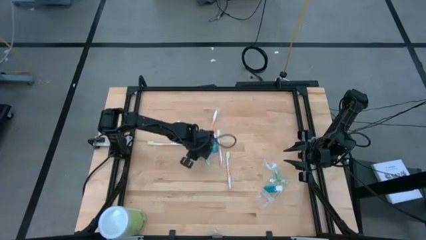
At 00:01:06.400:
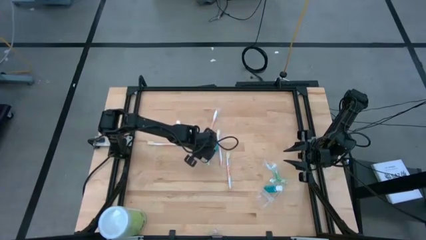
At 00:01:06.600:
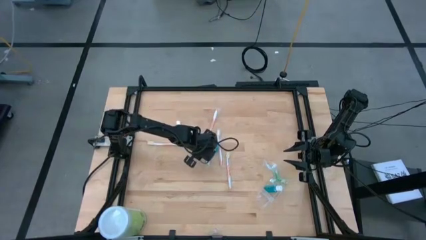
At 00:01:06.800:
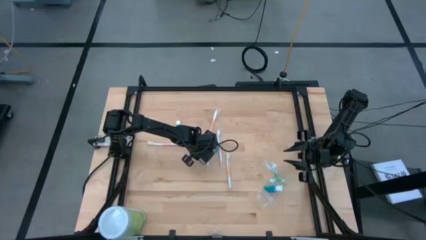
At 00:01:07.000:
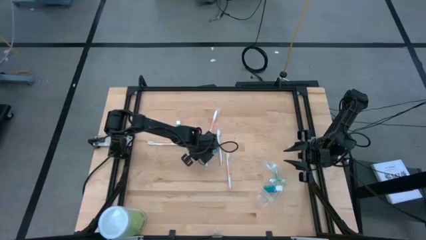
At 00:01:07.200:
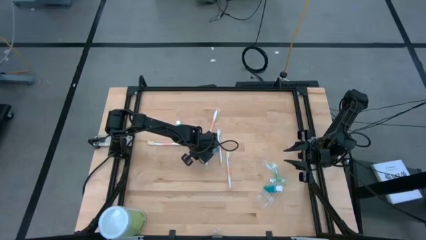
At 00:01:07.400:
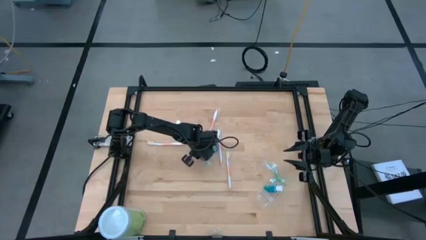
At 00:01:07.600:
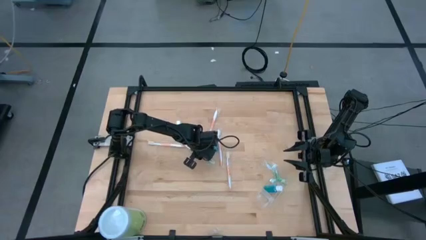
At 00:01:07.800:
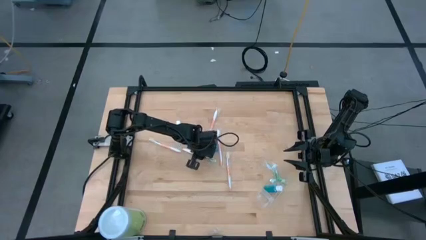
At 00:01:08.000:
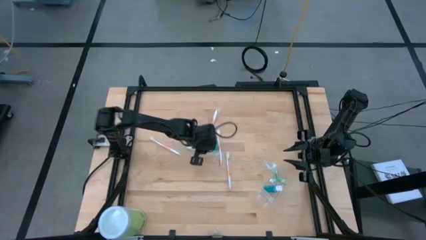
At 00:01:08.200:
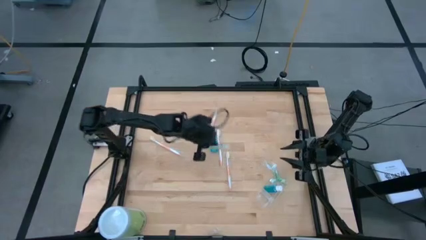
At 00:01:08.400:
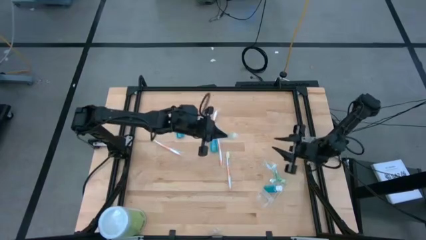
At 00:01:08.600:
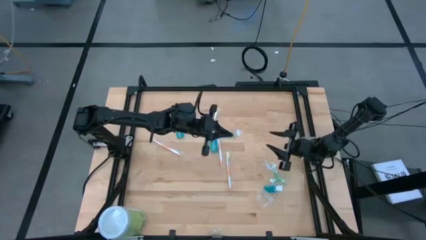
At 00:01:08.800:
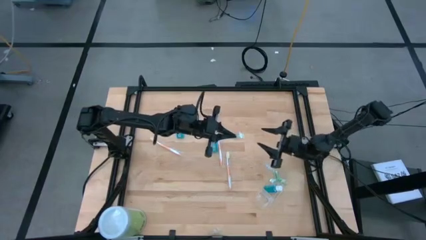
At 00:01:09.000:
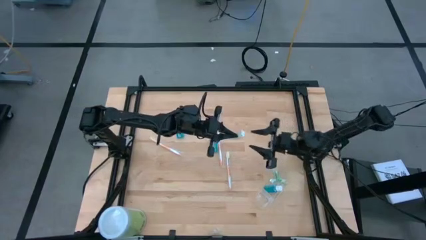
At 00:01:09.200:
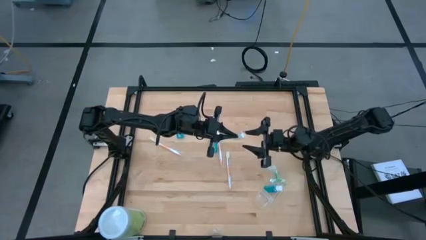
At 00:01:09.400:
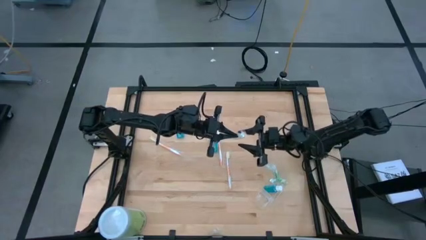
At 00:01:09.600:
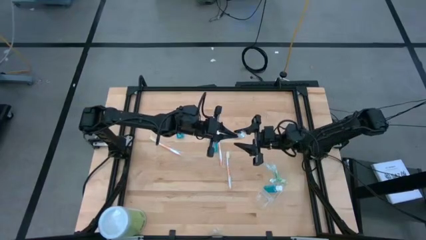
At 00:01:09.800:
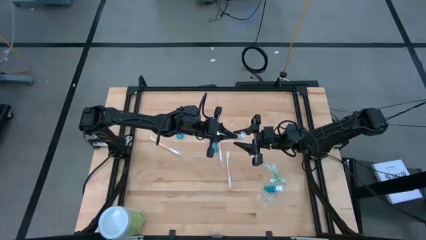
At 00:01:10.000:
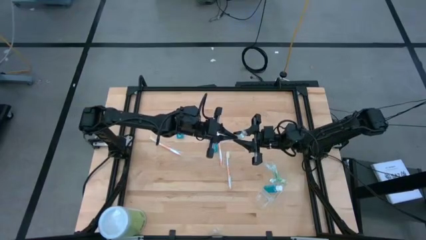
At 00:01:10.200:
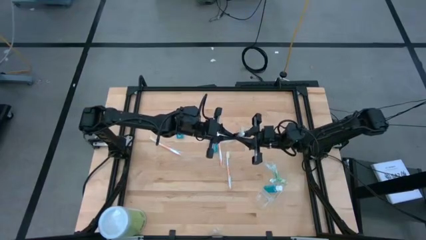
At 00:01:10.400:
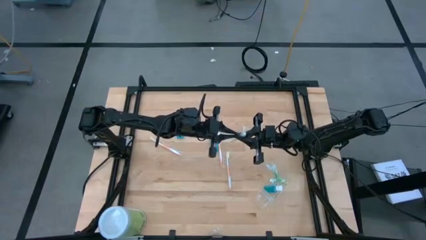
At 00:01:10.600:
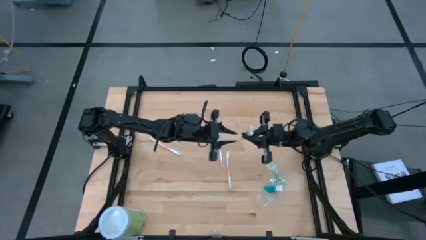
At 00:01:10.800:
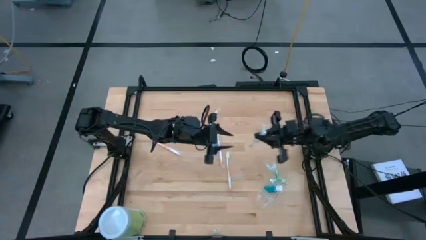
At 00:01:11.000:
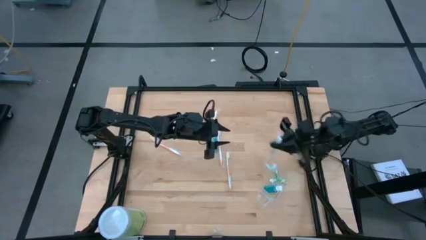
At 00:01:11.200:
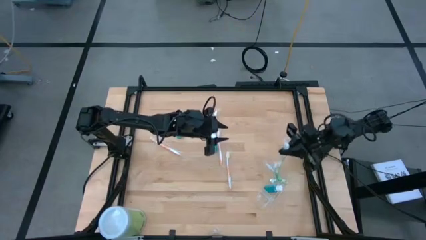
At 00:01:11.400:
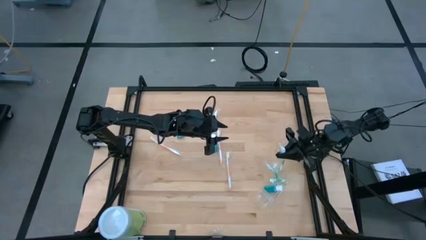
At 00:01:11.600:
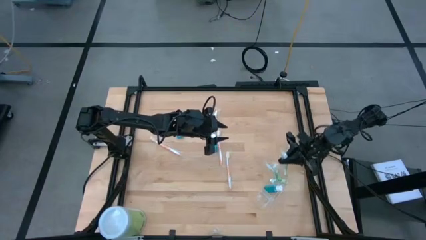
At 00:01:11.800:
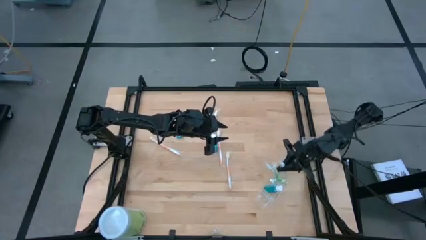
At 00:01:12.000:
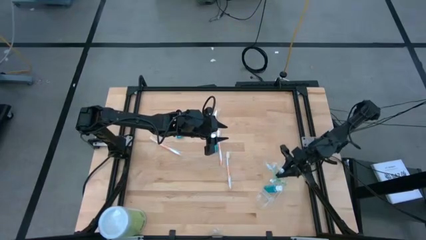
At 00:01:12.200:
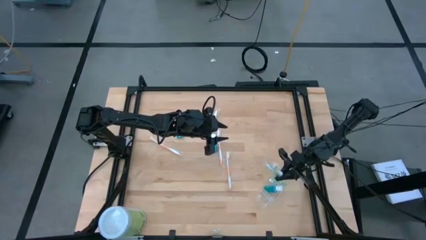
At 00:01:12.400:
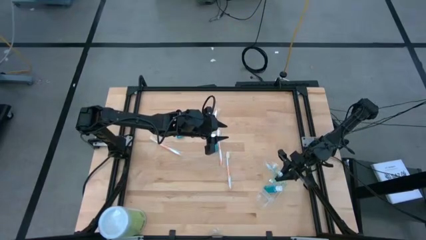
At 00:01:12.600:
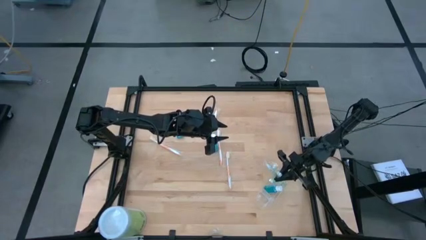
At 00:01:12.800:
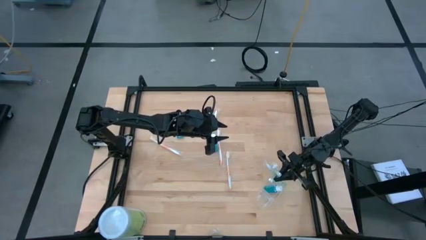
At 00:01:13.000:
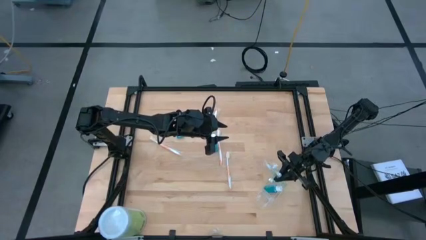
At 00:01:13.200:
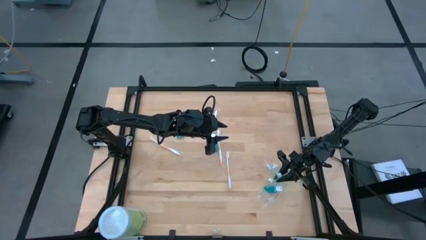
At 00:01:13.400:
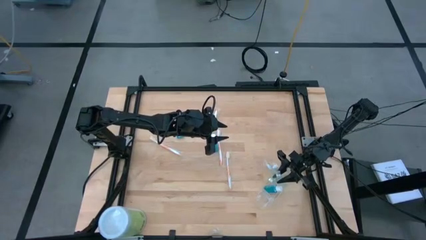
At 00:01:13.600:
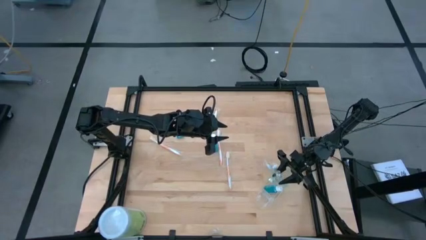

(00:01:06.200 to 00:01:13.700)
Task: Pick & Place toothbrushing station
Put the green toothbrush into the top section of the transparent organizer

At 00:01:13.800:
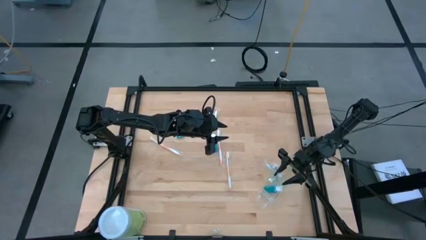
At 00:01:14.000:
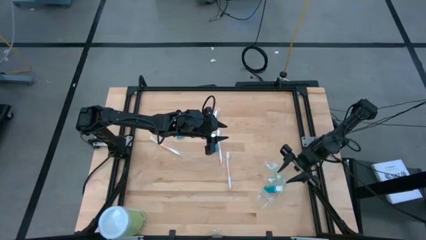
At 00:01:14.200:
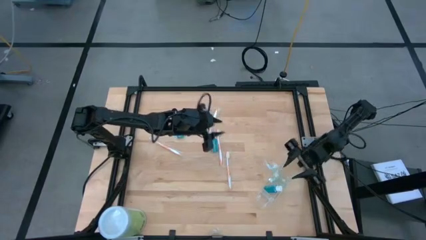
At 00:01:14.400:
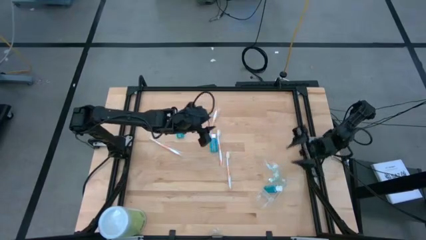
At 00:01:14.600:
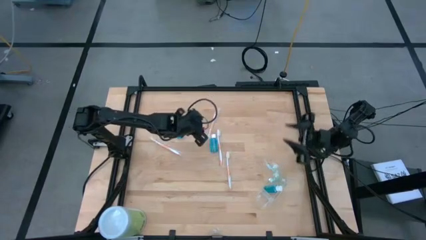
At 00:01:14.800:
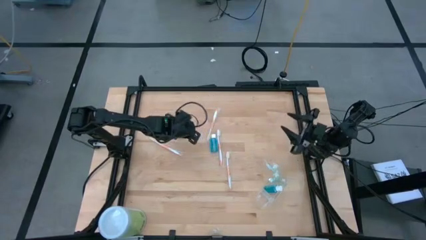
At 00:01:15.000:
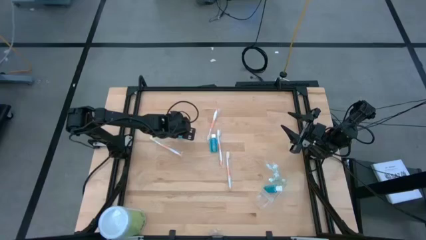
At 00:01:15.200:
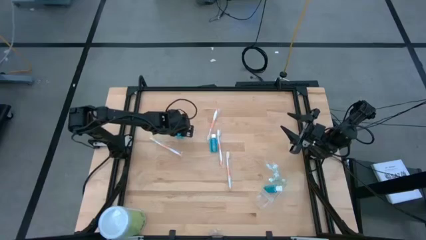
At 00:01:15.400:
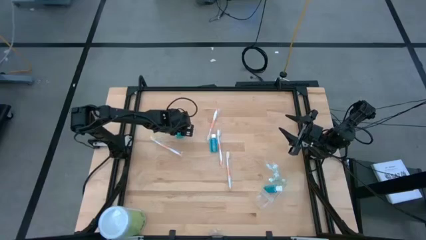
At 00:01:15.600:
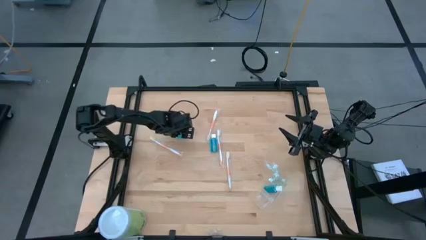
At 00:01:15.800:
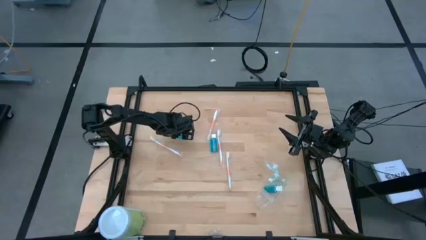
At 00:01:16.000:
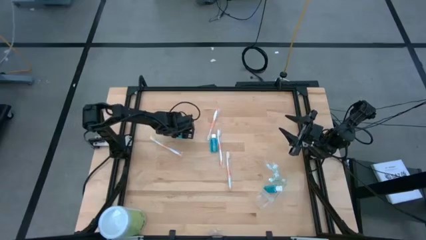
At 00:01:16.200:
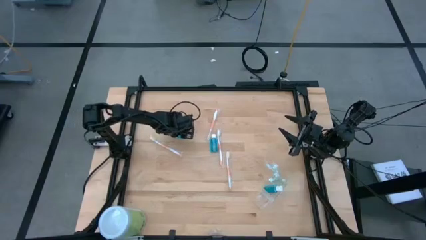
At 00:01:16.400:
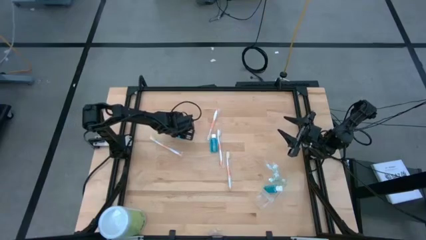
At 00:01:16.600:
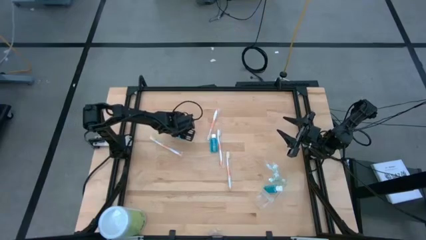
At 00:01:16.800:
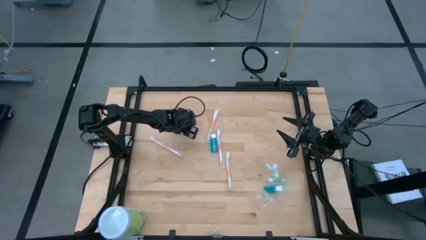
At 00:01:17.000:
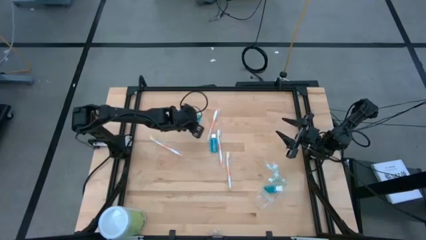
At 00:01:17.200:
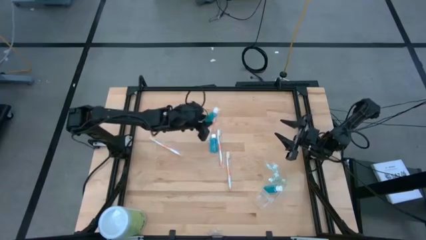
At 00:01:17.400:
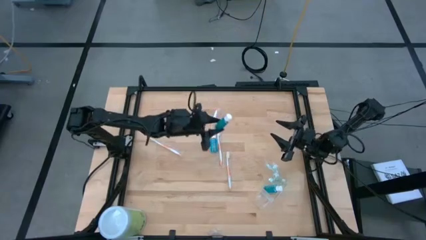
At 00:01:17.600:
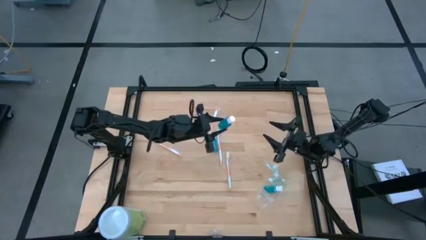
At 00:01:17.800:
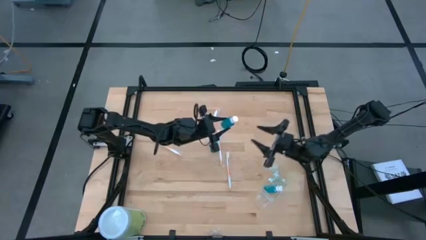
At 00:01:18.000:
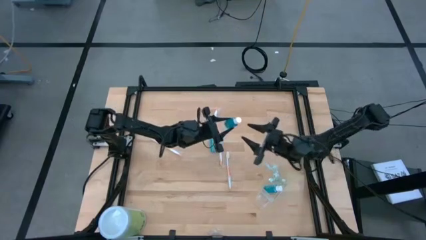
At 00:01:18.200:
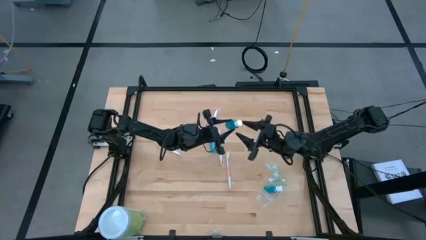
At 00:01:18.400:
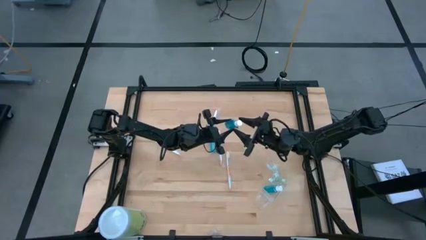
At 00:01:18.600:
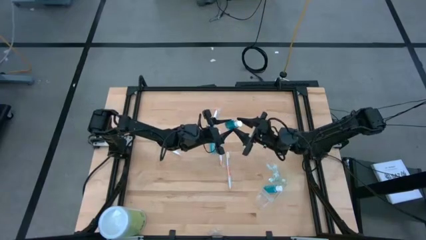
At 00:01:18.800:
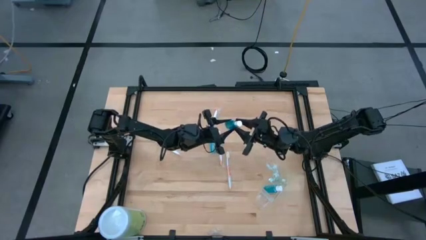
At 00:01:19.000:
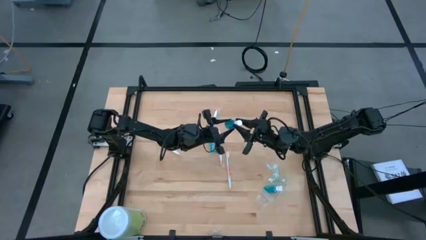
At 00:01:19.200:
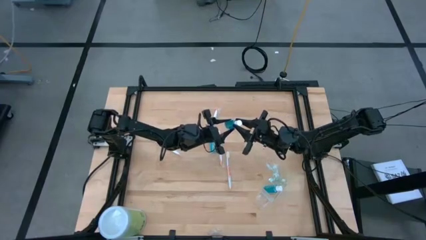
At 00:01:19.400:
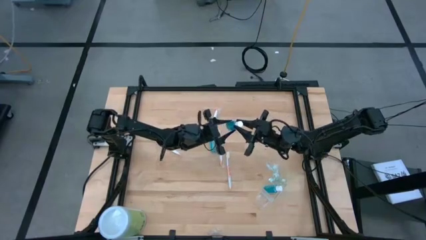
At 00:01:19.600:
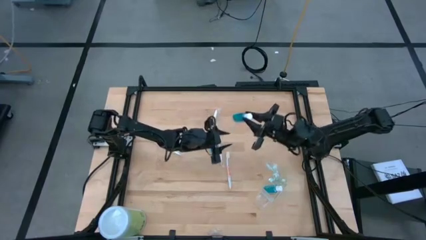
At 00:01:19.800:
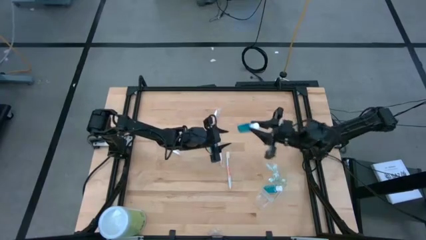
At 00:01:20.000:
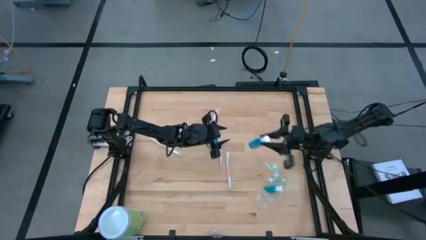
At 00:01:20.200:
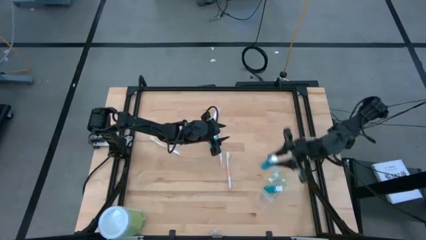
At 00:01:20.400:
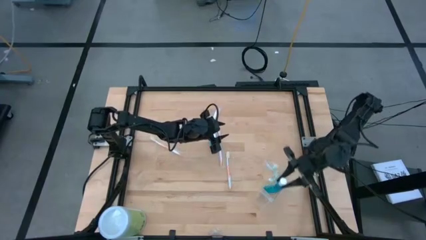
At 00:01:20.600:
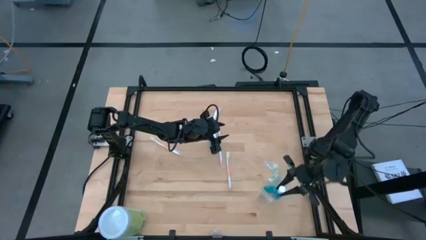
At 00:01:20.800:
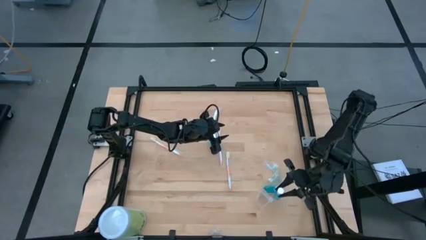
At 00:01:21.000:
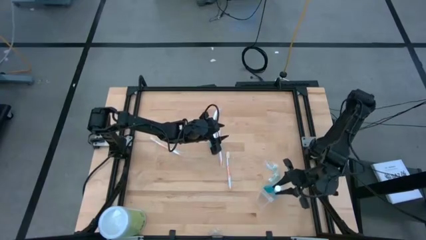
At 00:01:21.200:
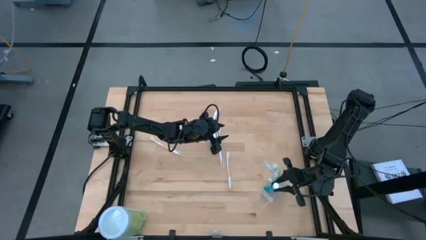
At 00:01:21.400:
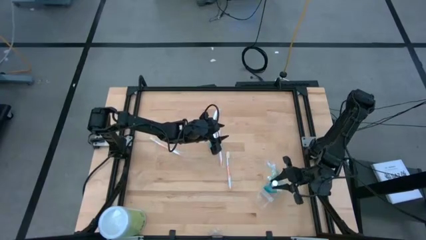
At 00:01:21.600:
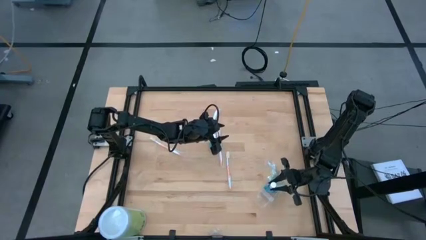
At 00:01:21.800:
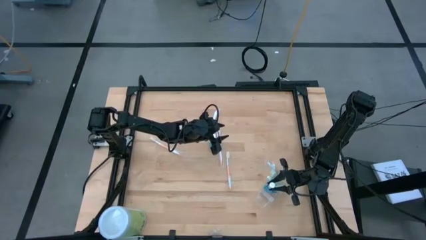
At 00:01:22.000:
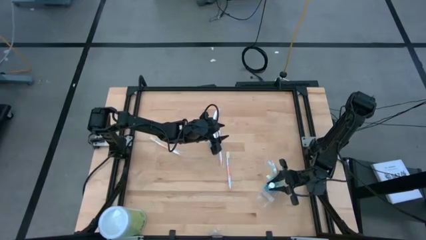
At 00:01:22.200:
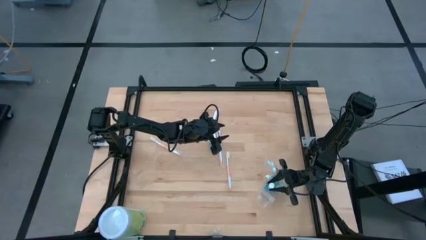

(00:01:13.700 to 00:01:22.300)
Put the blue mouthwash into the middle section of the transparent organizer

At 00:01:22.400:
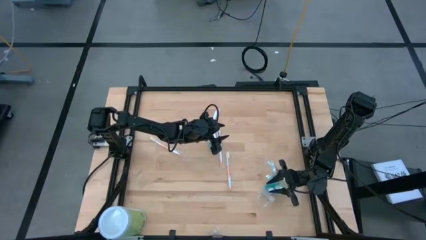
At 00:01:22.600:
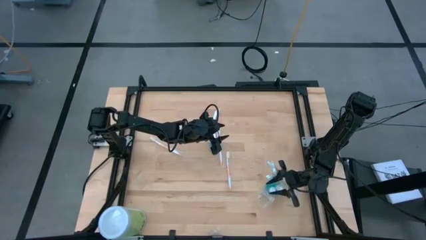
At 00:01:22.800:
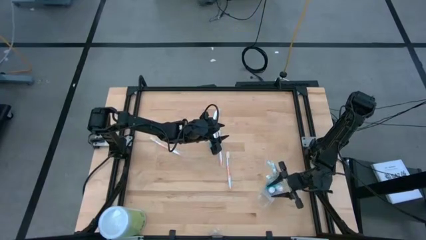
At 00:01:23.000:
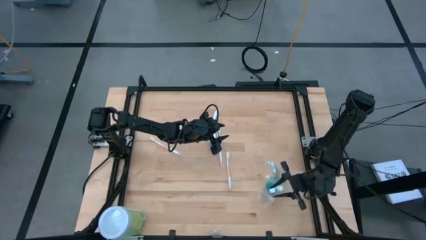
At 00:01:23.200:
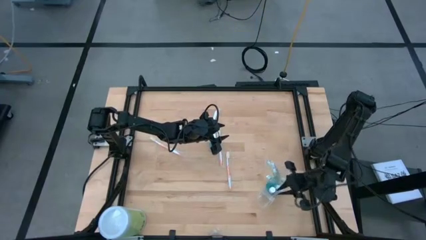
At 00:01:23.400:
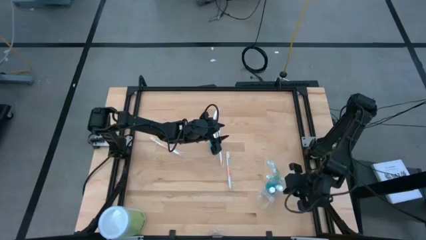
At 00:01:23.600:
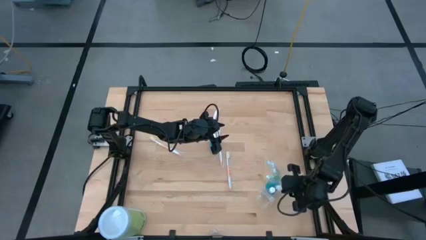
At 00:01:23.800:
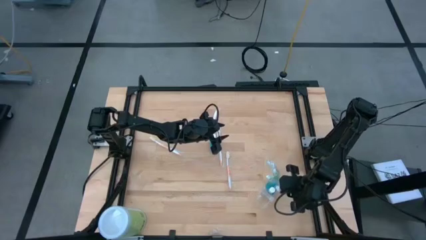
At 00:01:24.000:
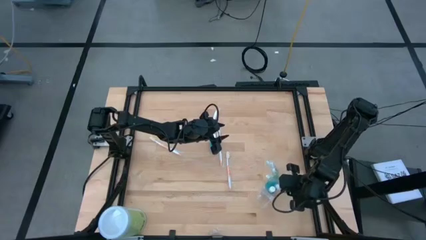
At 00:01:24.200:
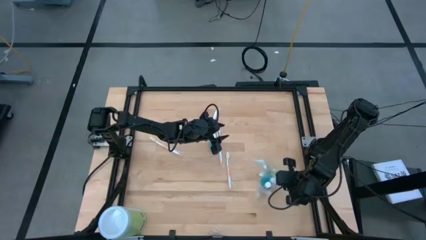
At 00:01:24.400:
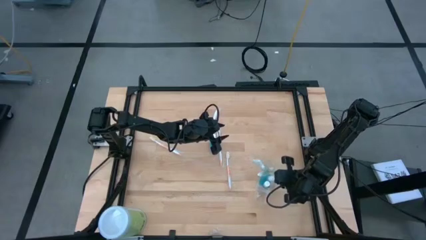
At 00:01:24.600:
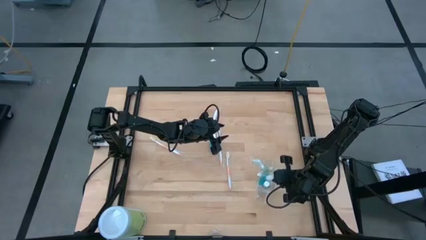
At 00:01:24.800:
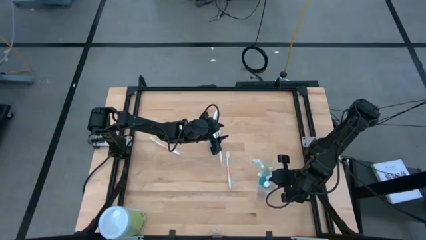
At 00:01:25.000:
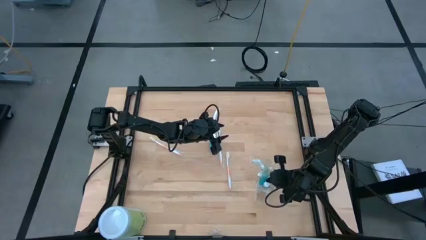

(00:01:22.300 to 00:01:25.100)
Adjust the blue mouthwash in the middle section of the transparent organizer
